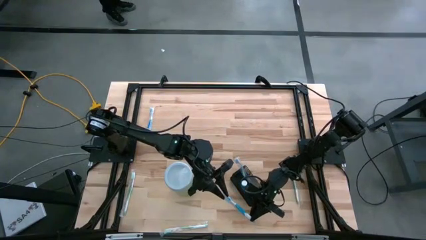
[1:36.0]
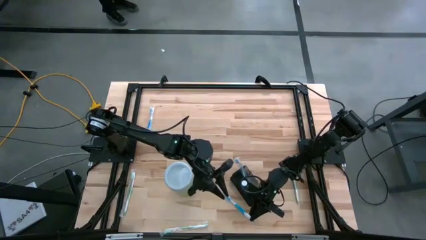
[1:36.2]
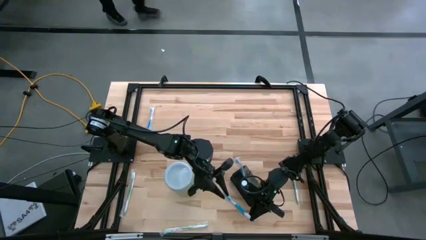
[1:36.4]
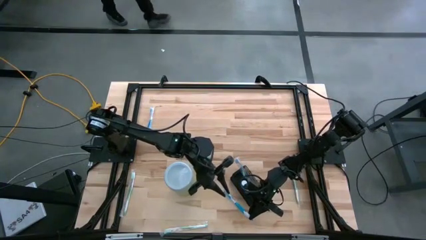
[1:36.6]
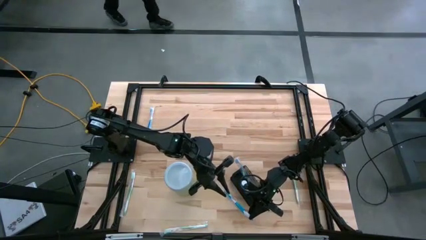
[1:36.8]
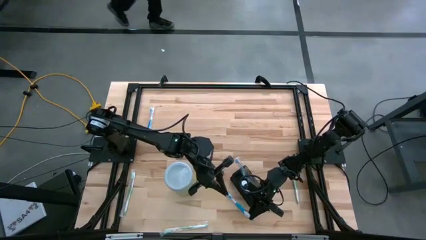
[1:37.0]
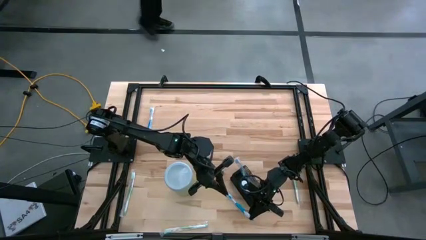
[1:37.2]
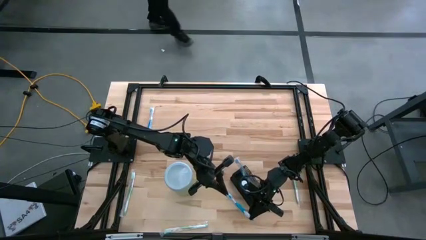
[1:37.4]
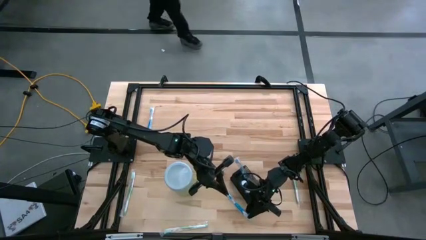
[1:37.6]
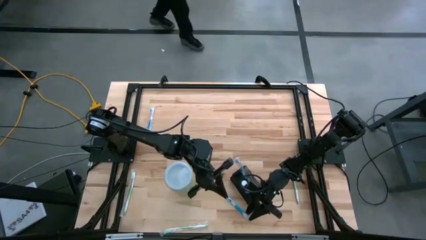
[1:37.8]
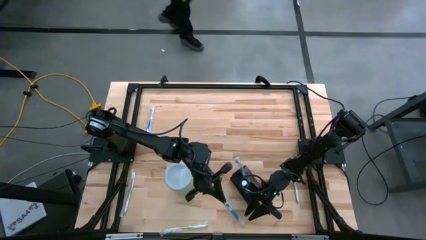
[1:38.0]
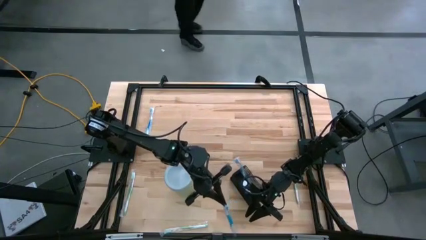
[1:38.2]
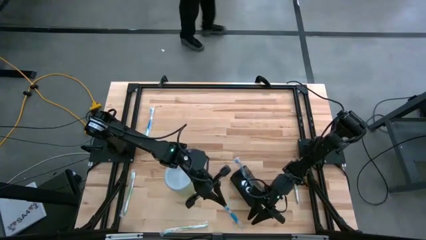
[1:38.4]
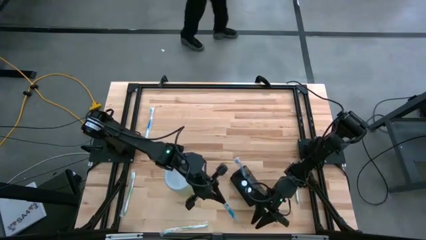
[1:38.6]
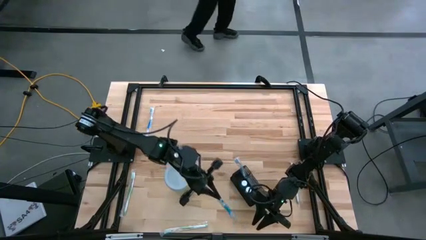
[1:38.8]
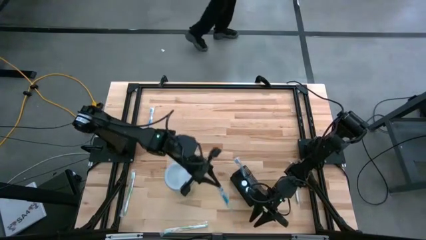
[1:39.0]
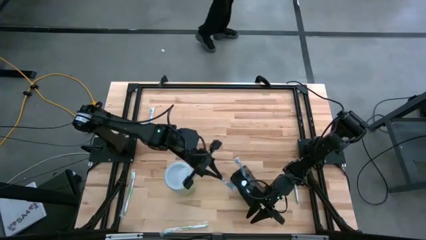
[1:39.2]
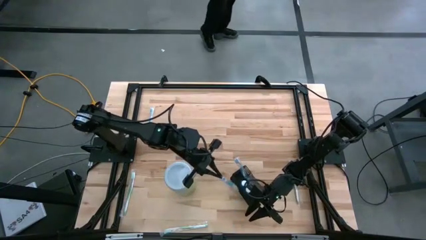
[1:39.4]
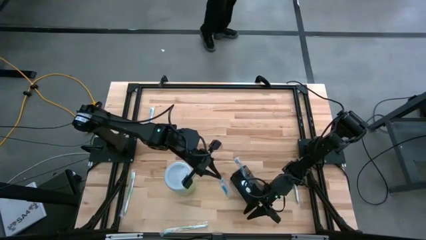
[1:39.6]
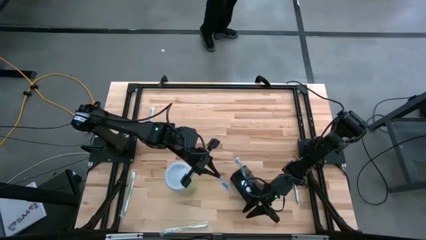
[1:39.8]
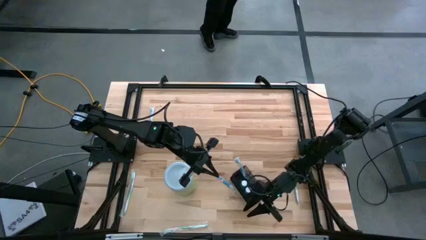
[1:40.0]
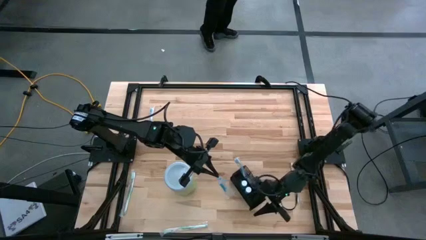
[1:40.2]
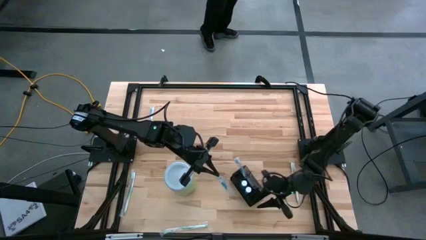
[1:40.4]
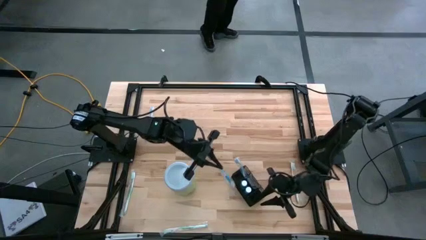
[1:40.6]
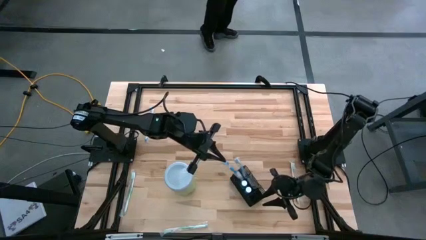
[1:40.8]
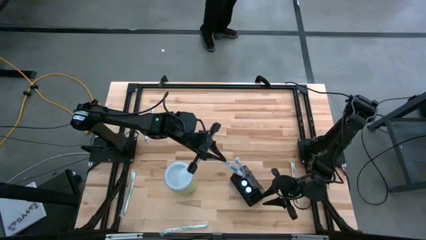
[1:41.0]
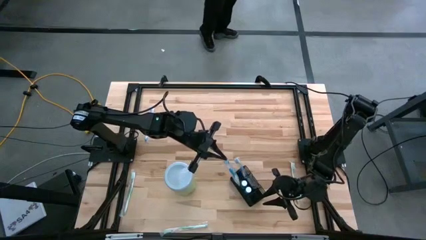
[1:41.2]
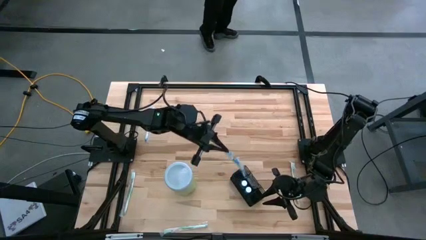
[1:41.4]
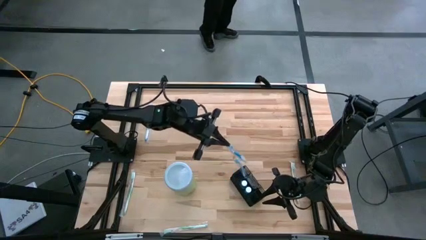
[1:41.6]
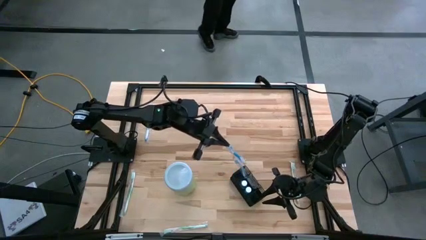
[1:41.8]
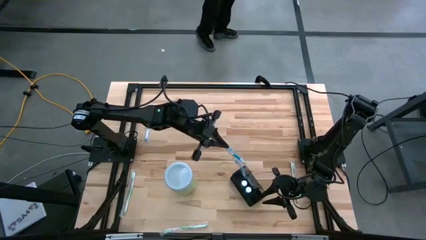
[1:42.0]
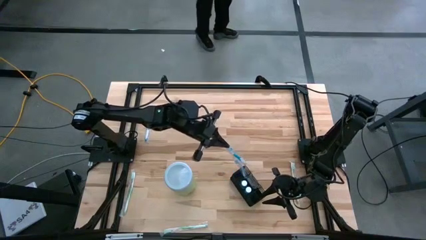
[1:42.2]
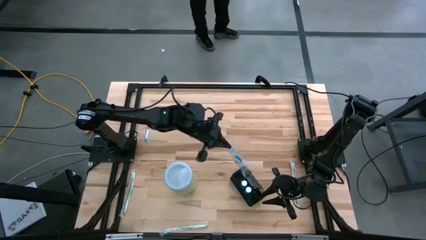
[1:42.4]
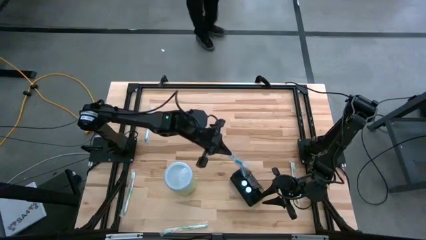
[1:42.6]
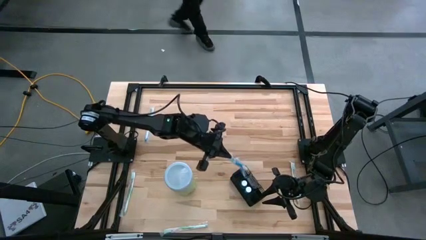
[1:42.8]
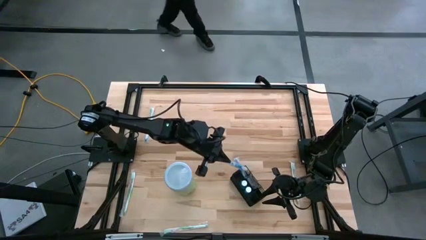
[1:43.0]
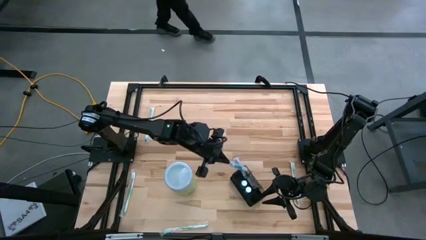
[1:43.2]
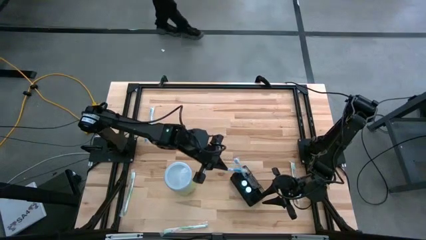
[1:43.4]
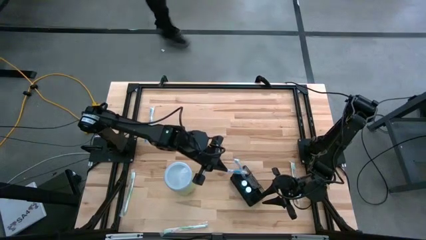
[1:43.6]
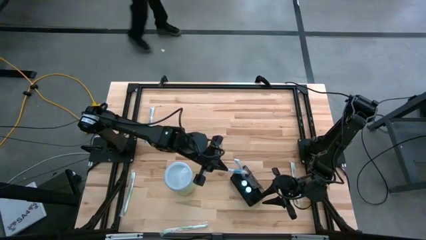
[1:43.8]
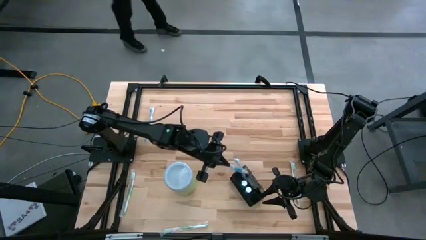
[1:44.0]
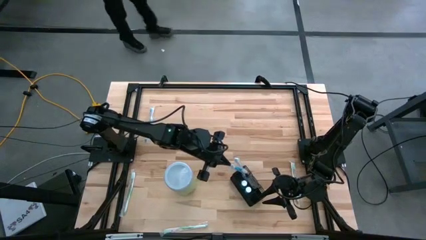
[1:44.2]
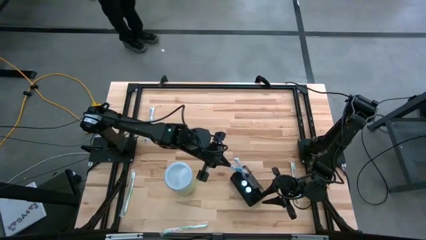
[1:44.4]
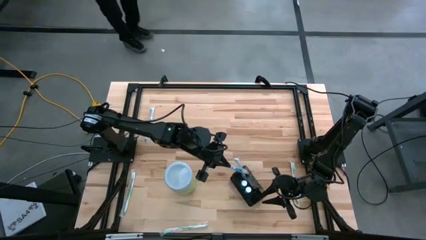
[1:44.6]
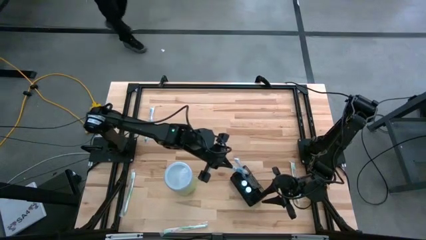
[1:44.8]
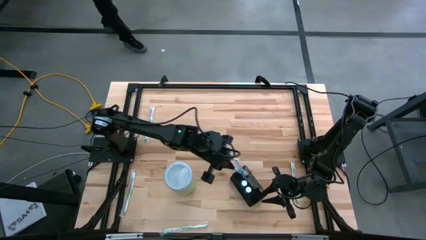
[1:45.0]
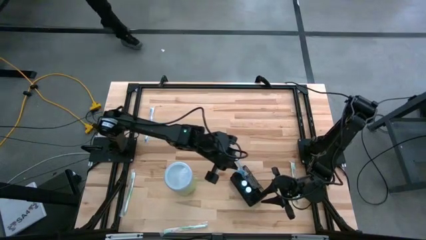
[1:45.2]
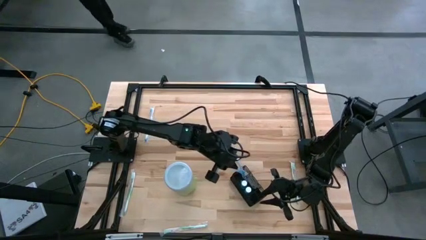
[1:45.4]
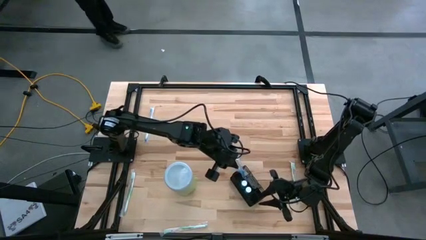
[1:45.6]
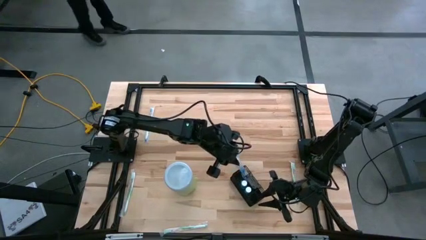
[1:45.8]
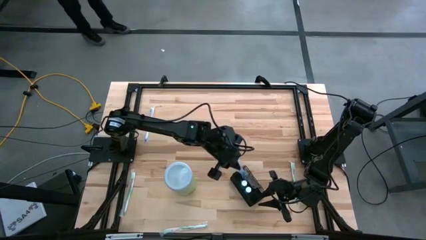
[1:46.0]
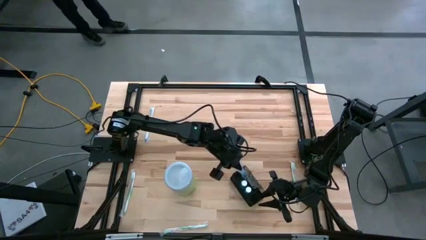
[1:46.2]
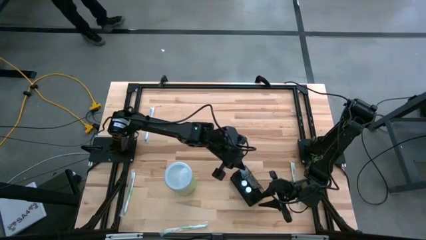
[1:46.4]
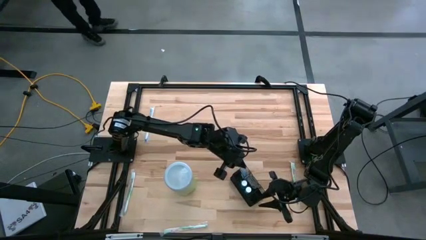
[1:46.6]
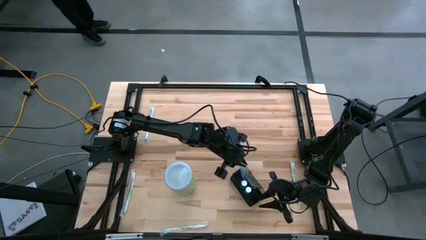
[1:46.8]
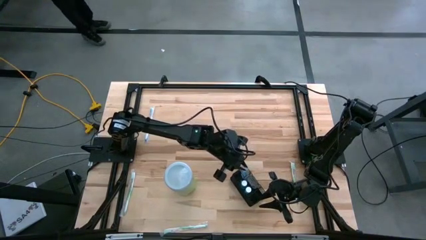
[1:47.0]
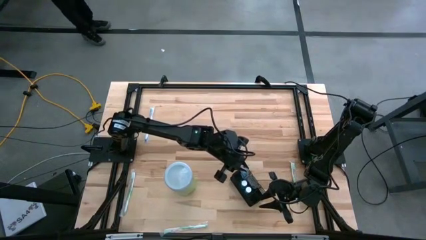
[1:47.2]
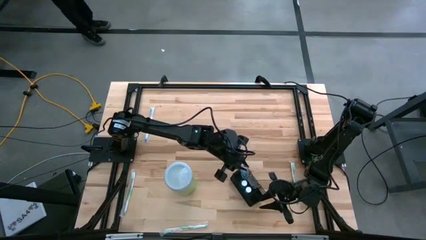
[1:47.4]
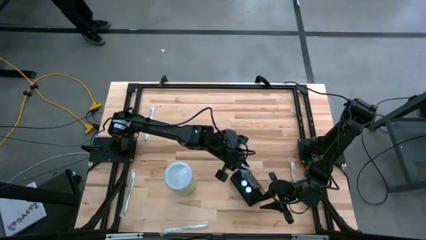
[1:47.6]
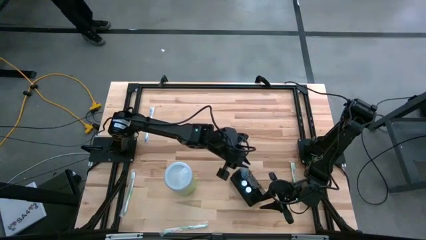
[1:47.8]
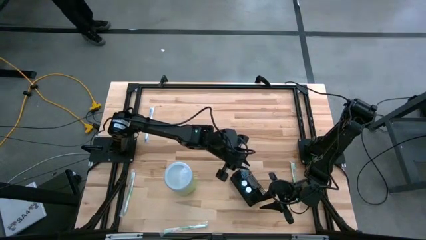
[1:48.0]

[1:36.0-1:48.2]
Task: Pick & Place toothbrushing station
Put the right blue toothbrush into the black mesh organizer

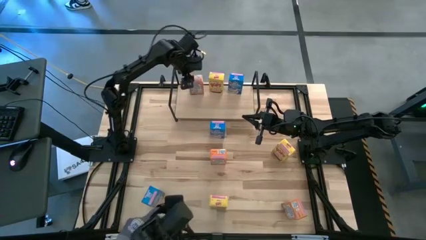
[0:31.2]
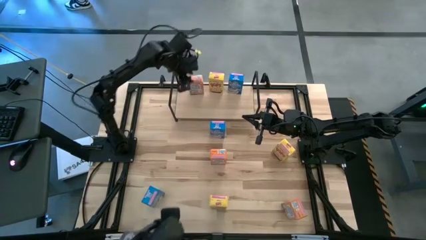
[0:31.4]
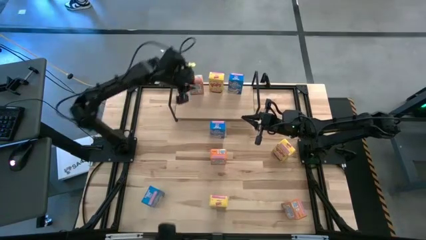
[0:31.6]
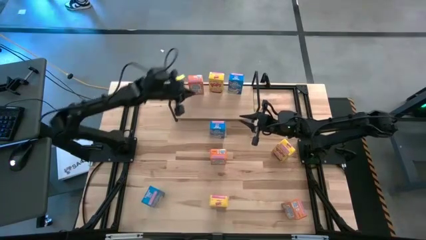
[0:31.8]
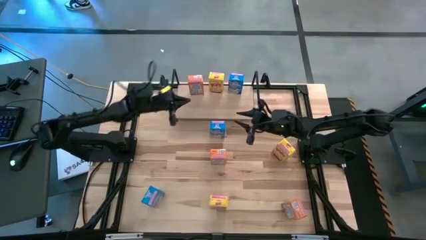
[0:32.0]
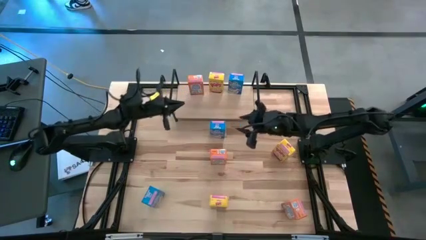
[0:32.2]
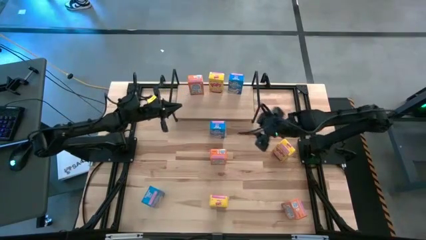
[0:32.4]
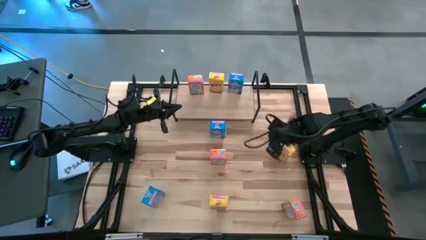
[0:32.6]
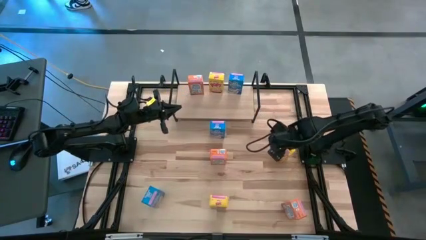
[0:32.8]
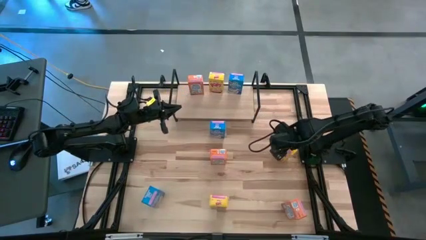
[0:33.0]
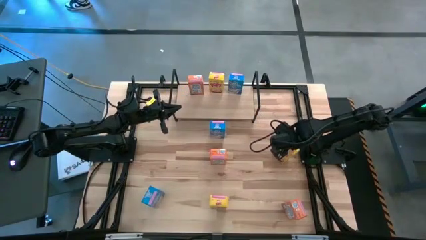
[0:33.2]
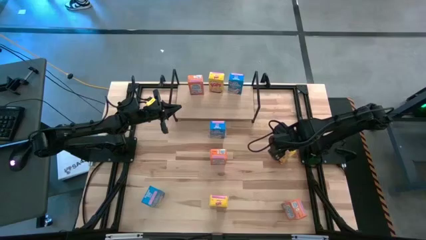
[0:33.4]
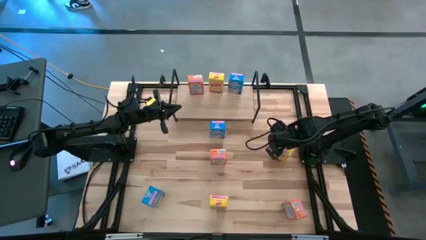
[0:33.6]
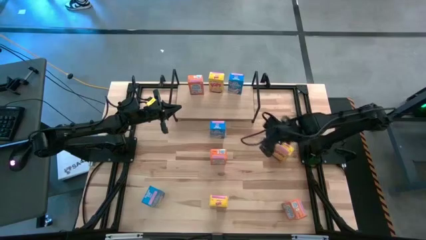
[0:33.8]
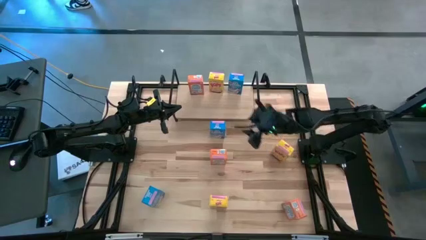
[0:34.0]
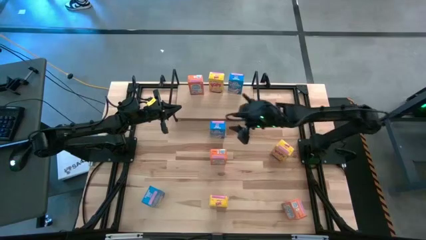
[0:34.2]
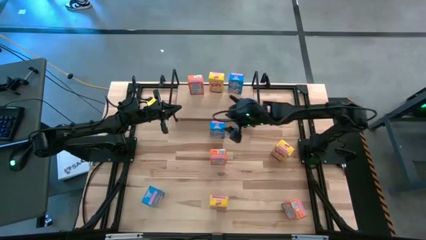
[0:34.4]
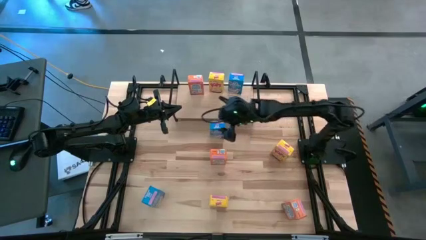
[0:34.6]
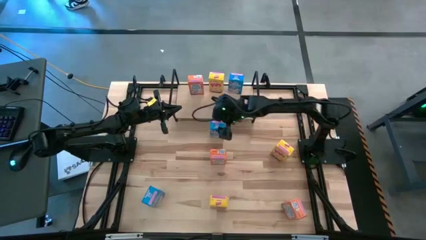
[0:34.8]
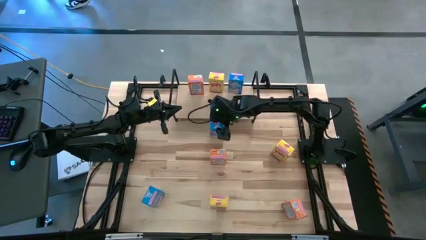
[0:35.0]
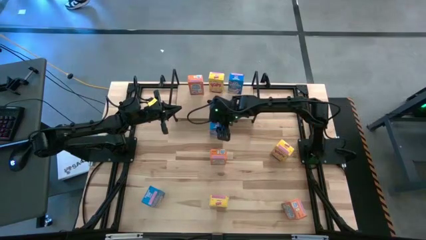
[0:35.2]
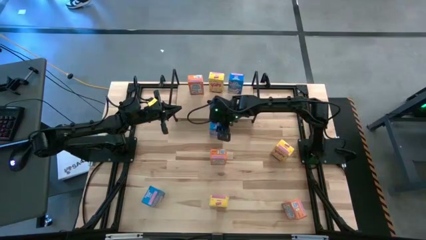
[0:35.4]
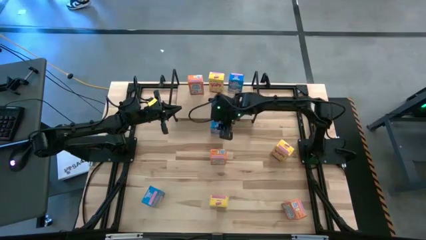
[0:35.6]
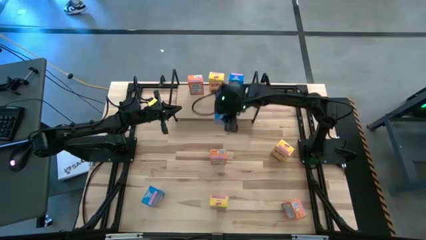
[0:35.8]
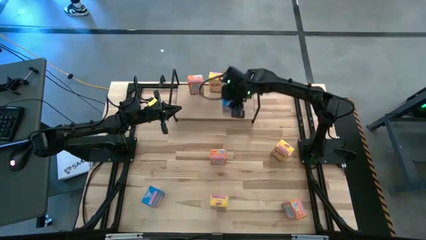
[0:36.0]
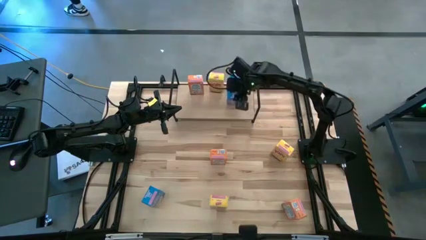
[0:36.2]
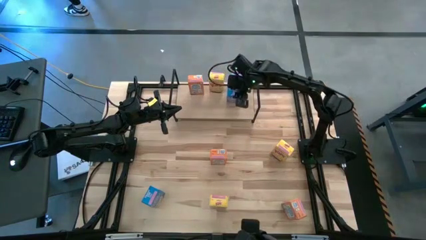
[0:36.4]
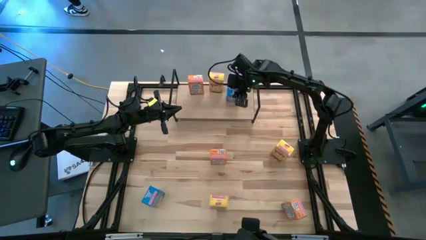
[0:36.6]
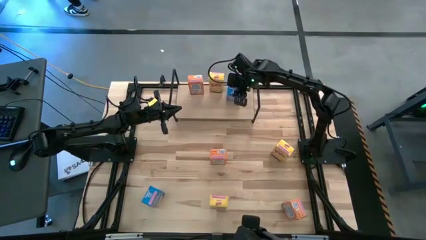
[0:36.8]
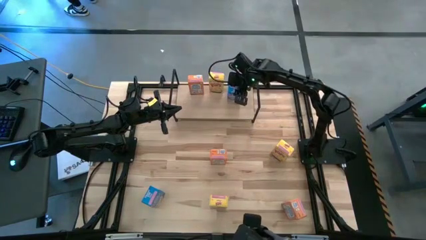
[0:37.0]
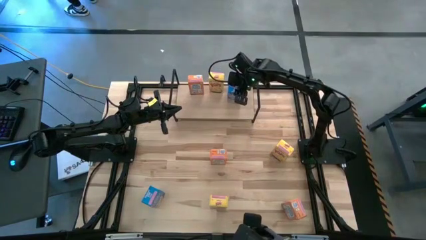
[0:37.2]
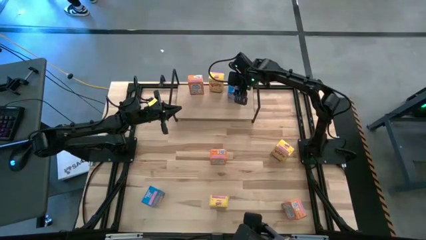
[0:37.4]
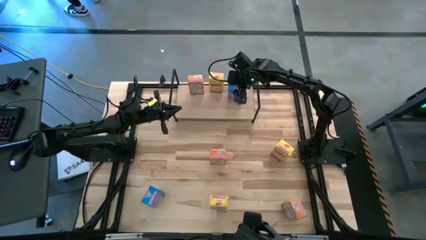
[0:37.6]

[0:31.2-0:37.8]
Task: Stack cereal on shelf
Put the top blue cereal box on the shelf aligned with the other blue cereal box
